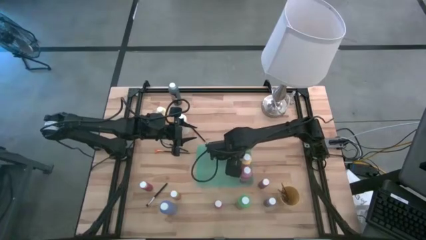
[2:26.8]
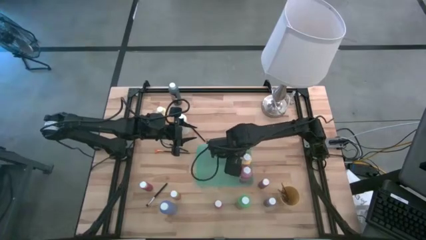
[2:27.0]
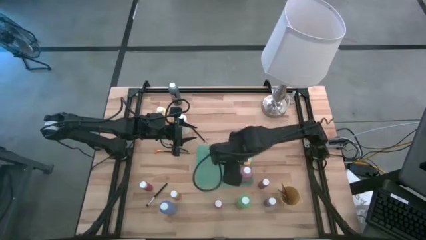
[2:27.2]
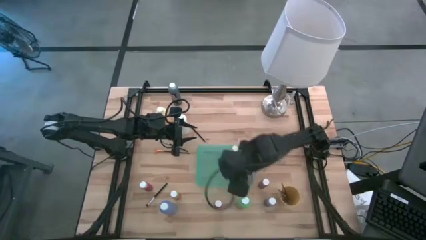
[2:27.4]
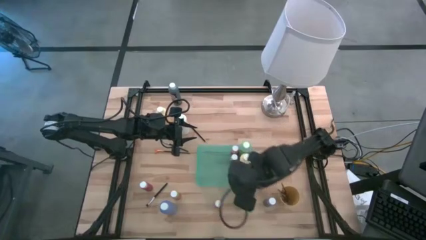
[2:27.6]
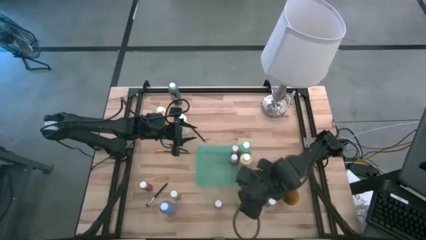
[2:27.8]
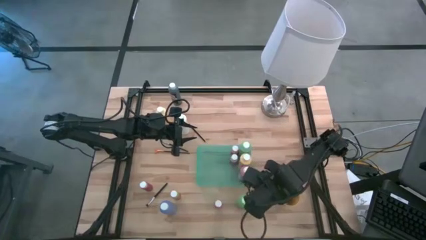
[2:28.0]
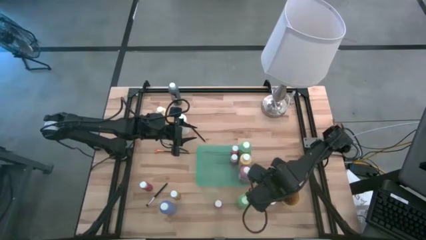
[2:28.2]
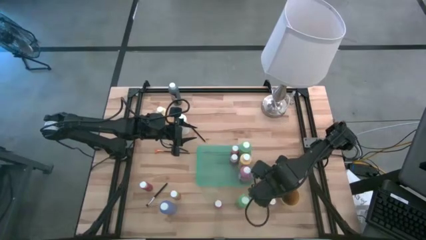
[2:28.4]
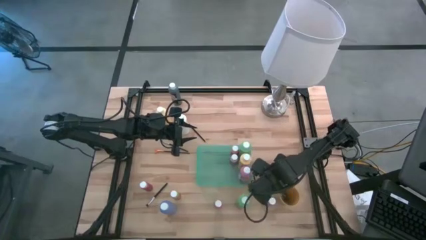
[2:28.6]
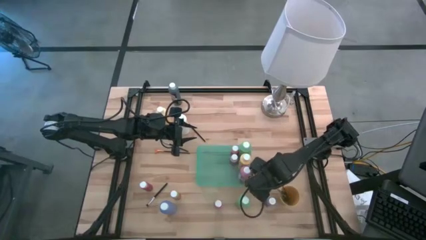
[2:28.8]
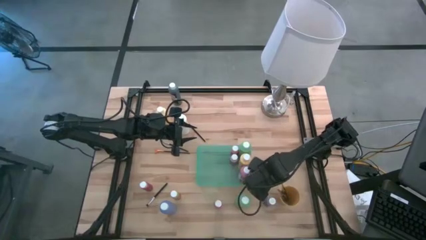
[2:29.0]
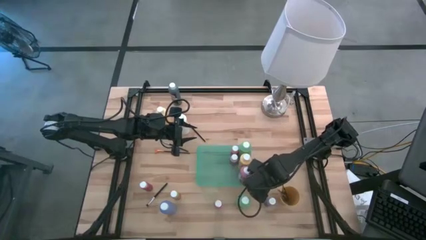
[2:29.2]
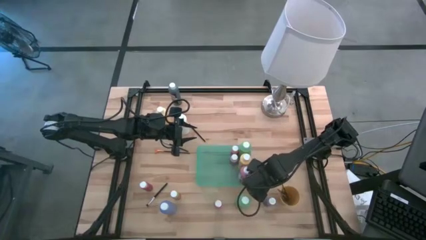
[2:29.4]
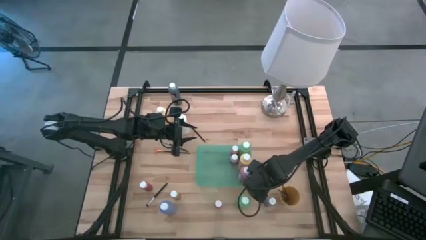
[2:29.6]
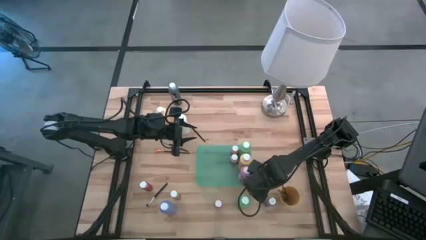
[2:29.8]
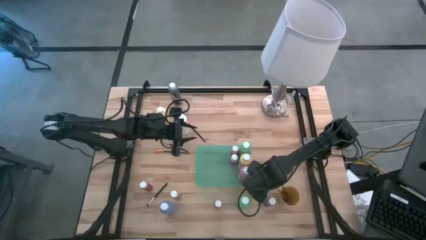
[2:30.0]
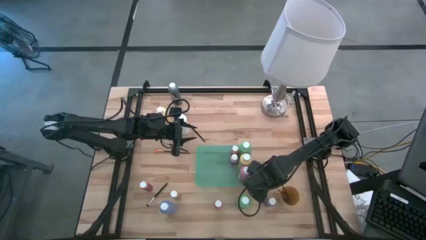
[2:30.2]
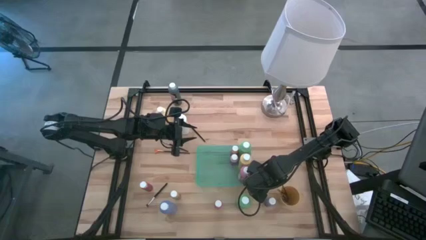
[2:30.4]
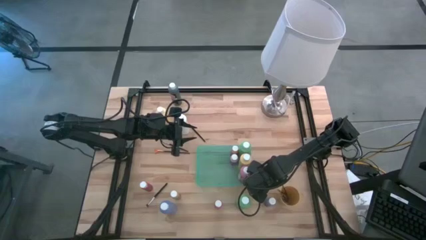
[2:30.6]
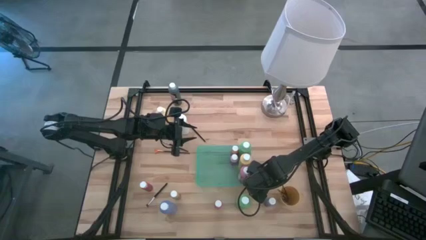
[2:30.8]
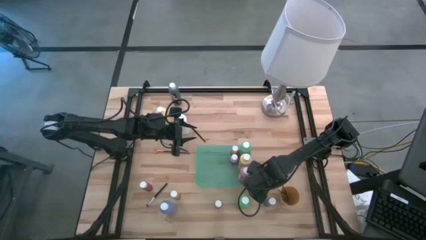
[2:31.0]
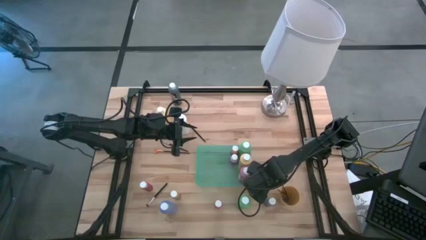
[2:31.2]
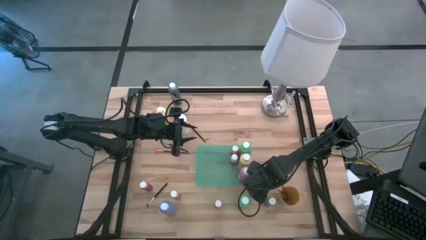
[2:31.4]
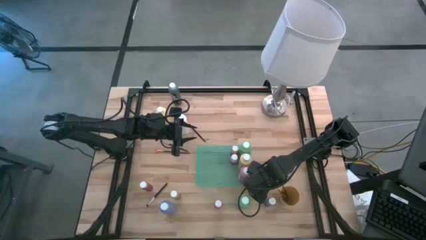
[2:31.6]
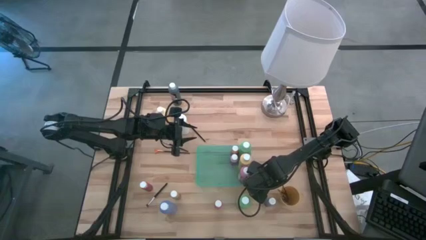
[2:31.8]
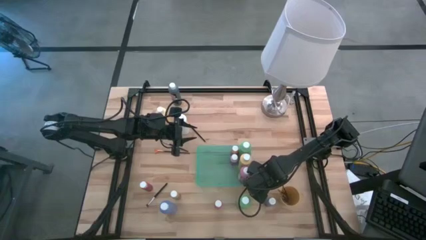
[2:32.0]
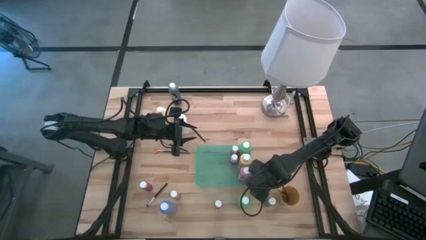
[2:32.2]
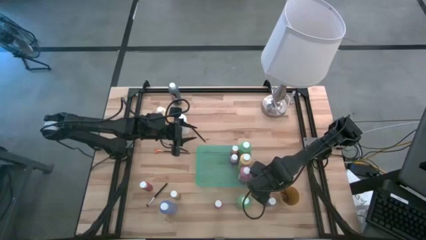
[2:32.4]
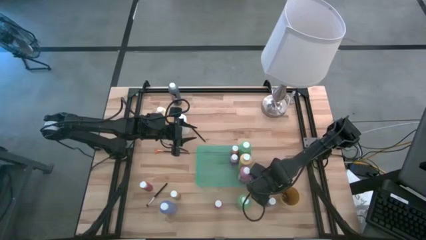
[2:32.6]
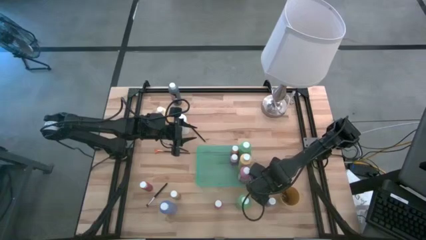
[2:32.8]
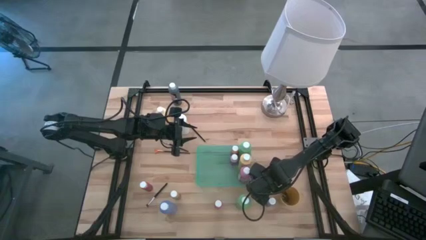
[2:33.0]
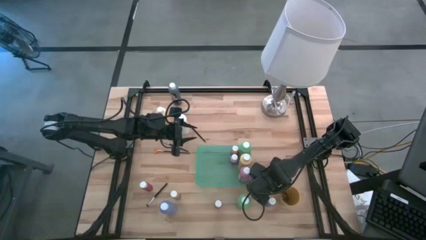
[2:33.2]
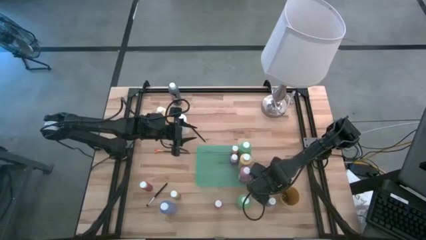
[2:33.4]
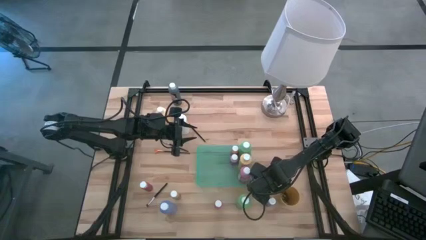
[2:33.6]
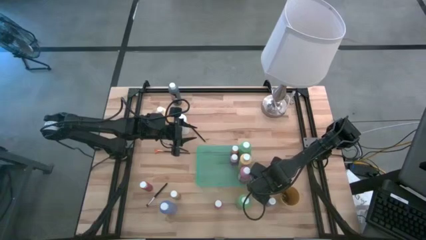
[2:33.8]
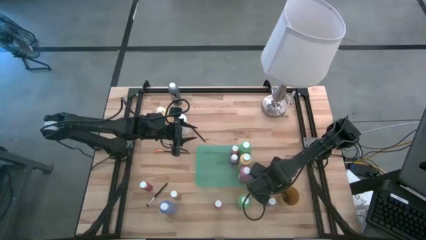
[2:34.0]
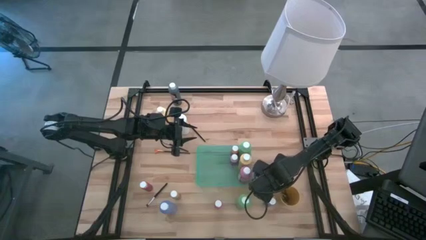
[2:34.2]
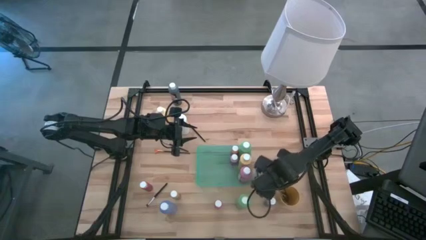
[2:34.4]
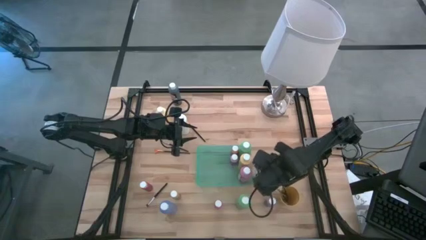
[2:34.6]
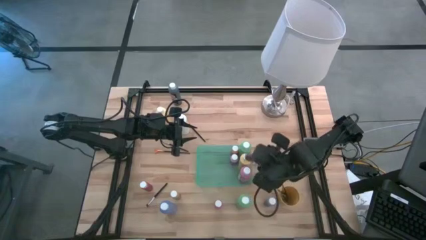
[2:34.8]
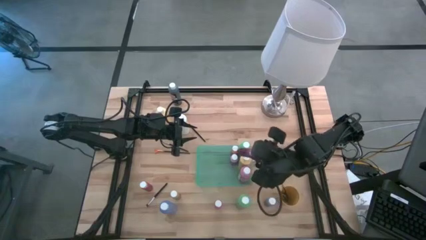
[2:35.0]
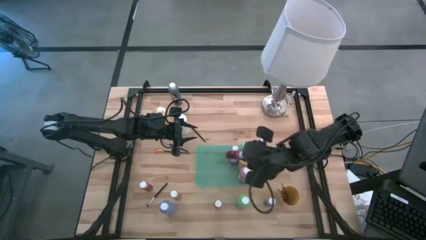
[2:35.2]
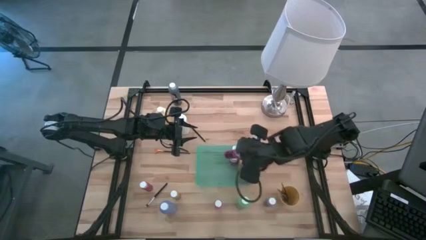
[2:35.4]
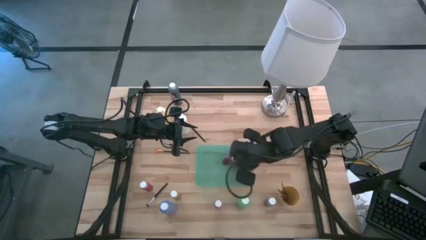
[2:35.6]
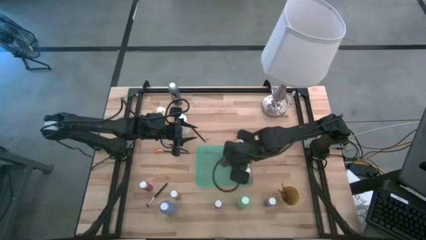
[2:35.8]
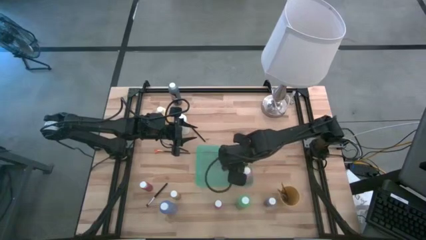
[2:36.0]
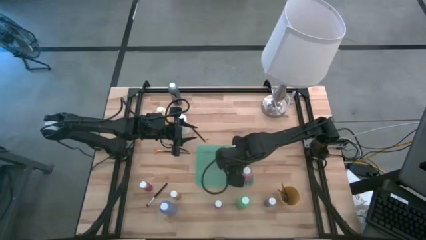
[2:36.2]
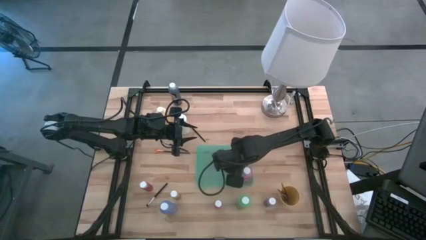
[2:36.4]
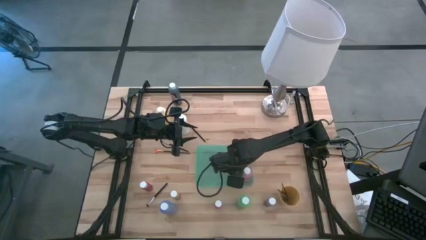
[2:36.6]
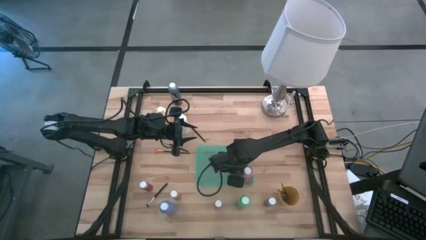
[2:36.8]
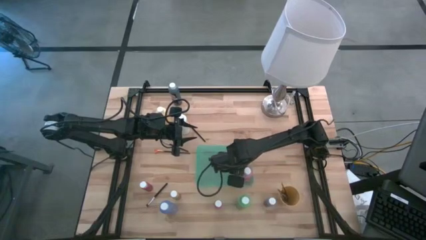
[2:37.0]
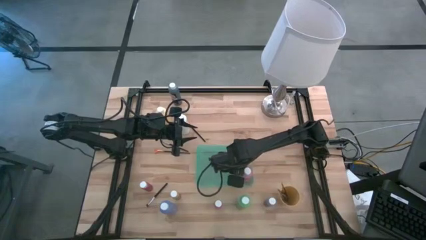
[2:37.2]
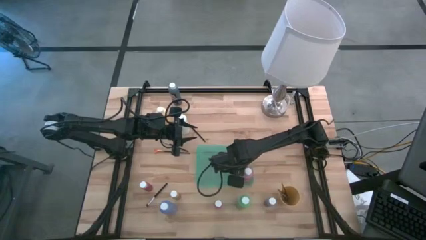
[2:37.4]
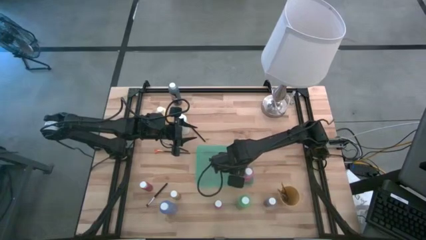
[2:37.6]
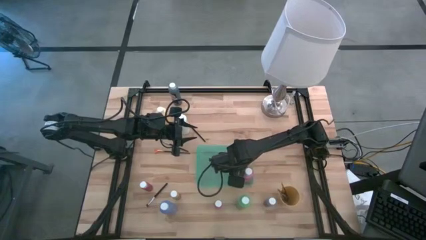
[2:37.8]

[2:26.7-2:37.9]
Task: Pick & Place Paint Supplies
Put the dark pink paint bottle into the green bin

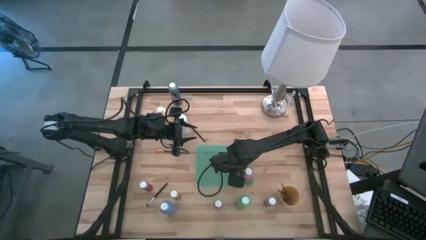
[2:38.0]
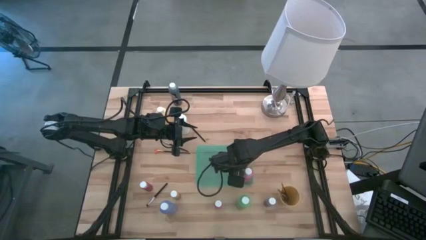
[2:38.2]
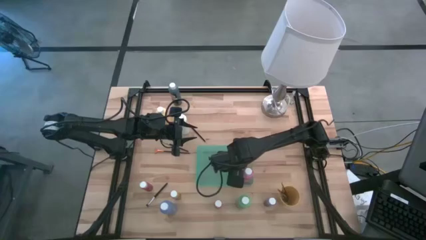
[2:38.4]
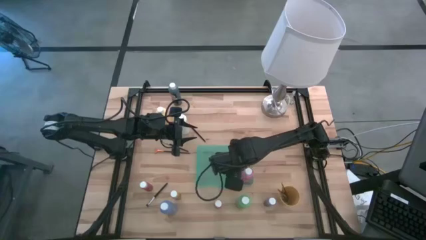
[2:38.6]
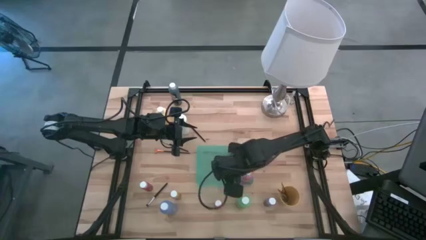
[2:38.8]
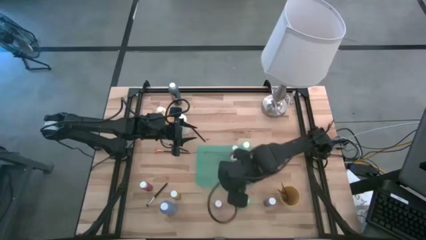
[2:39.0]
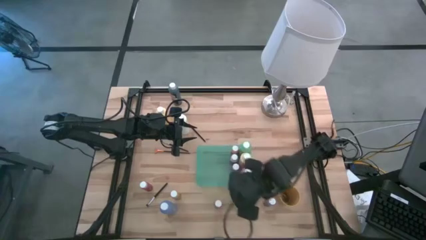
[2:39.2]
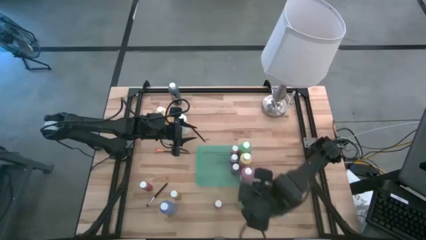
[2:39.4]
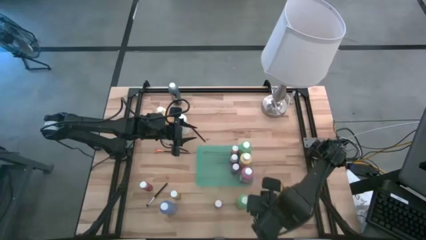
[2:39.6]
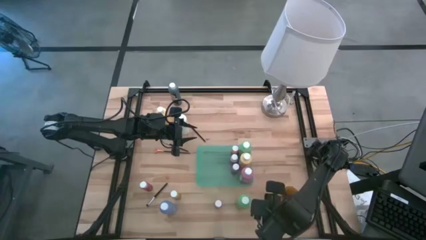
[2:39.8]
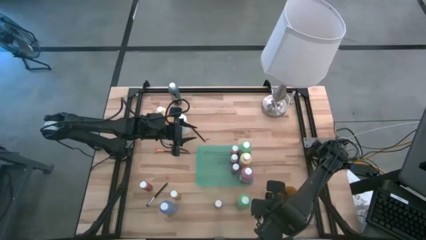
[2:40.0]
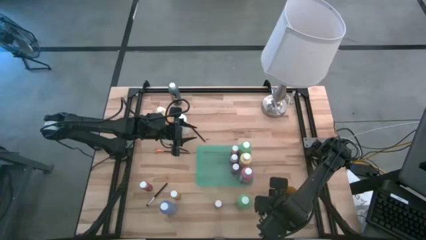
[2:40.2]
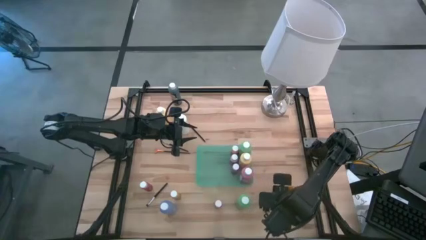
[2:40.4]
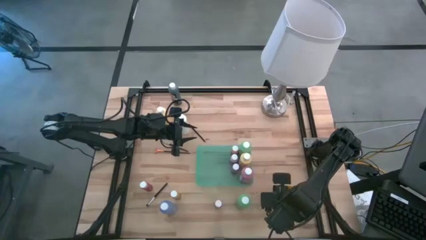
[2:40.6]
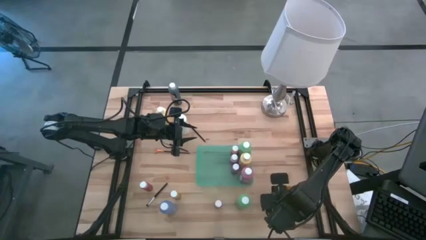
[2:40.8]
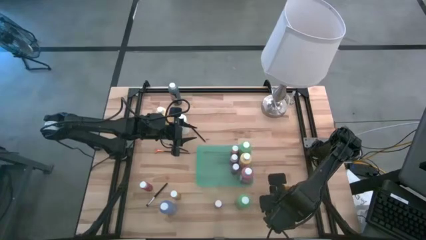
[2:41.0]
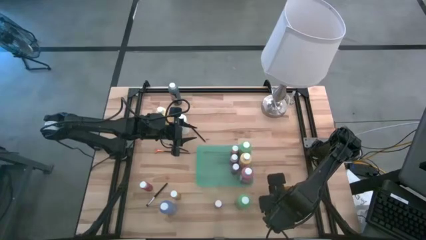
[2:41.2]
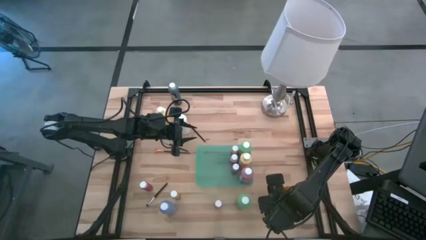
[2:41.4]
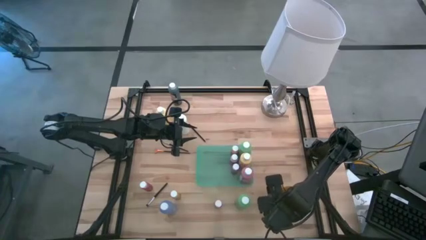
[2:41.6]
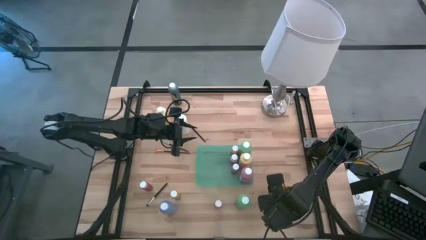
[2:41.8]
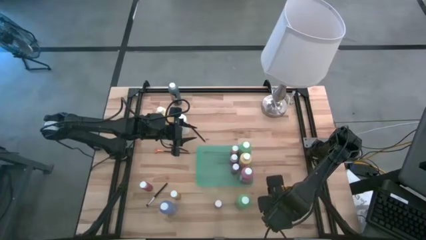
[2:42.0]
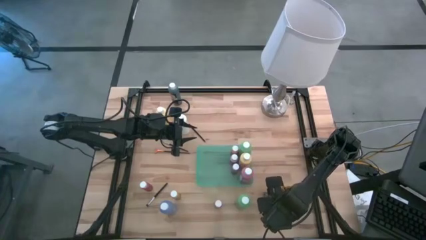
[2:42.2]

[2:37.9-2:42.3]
Put the purple paint bottle into the green bin
